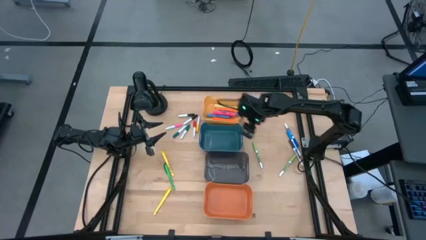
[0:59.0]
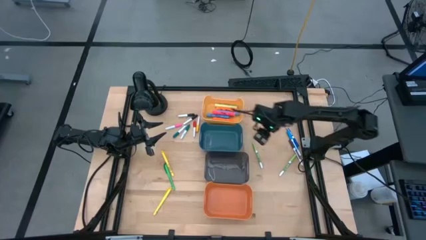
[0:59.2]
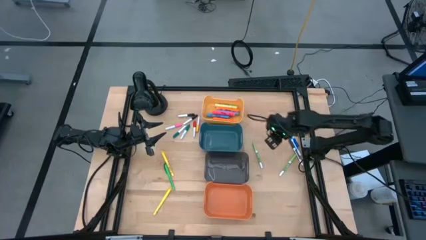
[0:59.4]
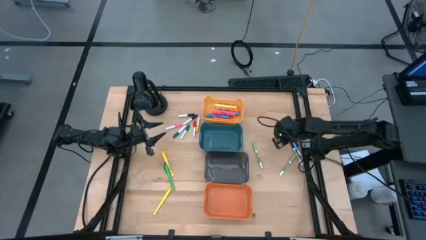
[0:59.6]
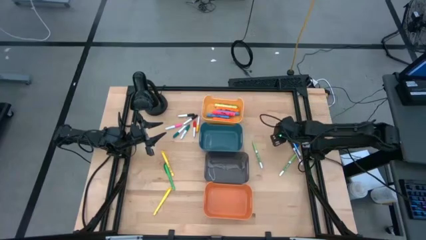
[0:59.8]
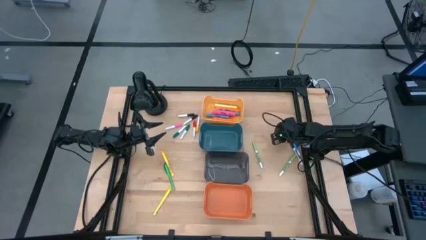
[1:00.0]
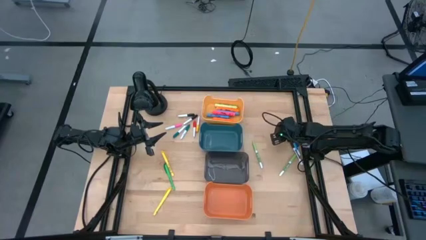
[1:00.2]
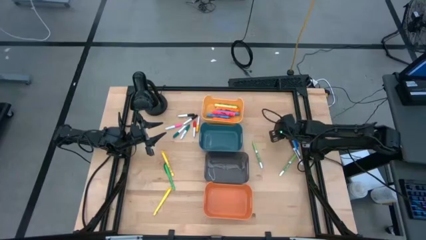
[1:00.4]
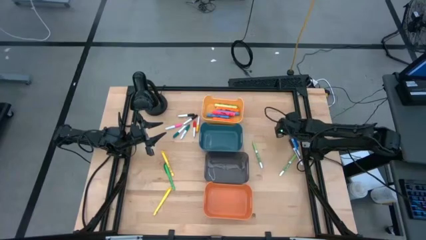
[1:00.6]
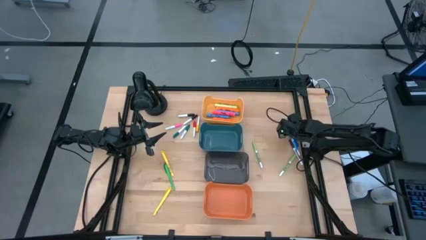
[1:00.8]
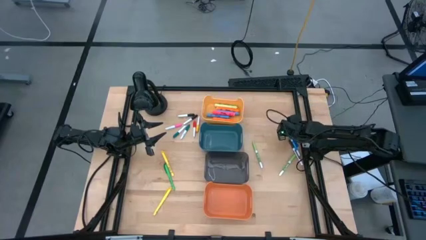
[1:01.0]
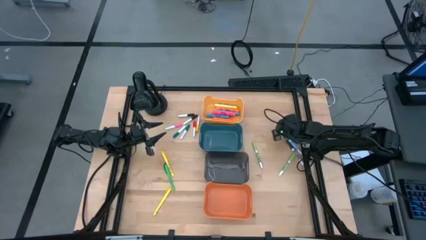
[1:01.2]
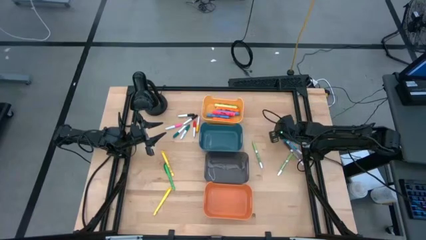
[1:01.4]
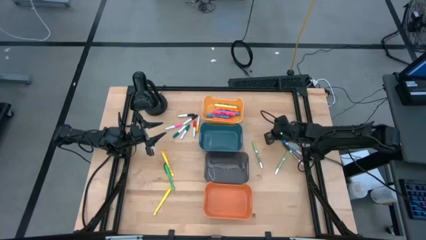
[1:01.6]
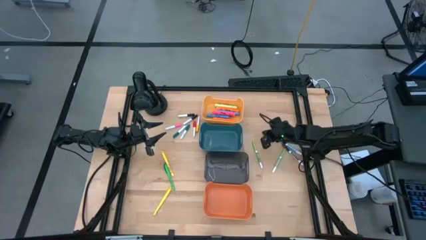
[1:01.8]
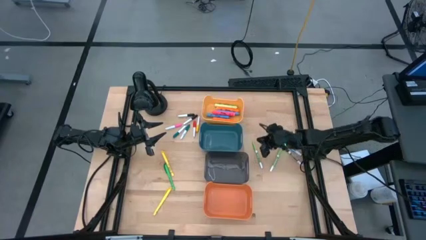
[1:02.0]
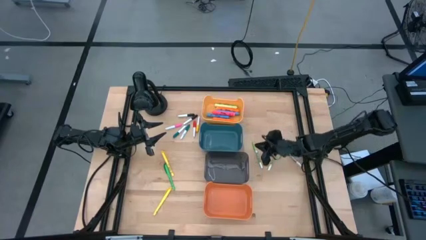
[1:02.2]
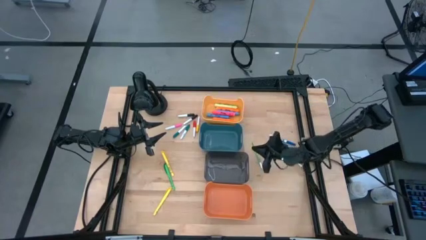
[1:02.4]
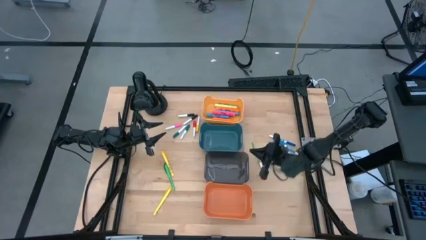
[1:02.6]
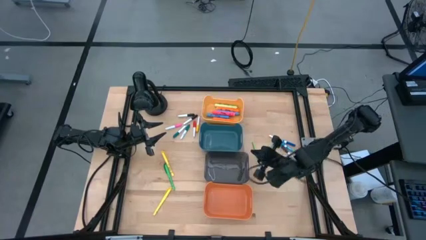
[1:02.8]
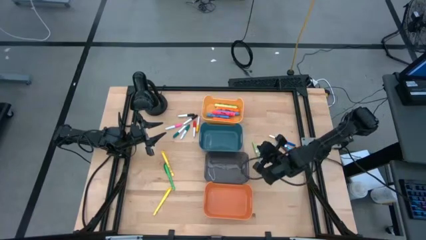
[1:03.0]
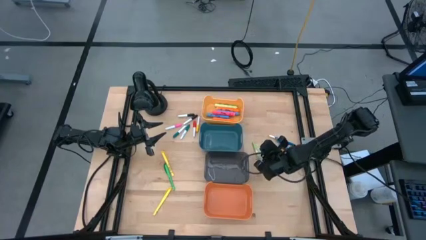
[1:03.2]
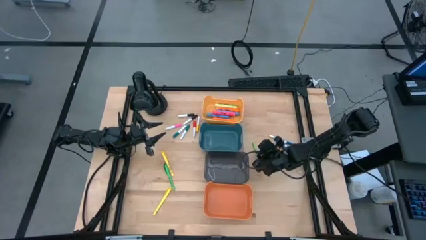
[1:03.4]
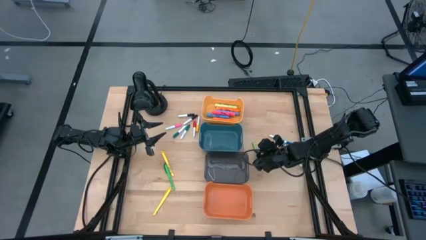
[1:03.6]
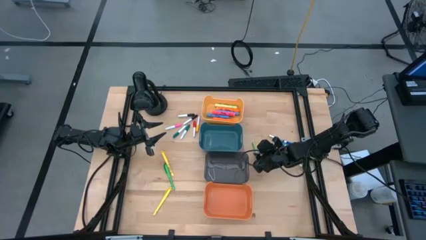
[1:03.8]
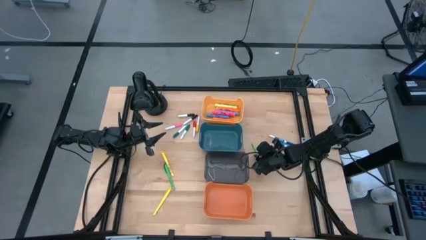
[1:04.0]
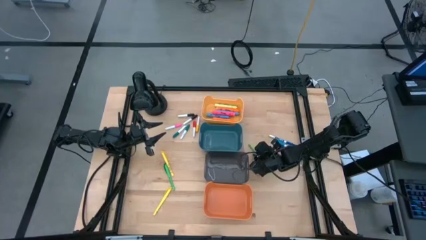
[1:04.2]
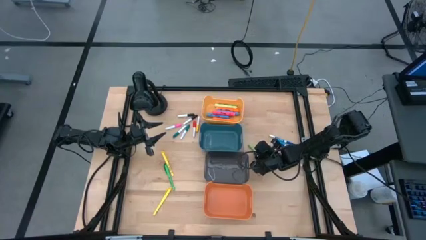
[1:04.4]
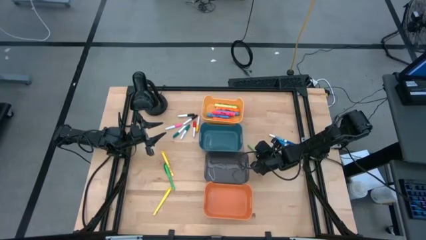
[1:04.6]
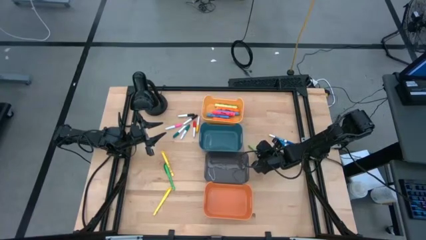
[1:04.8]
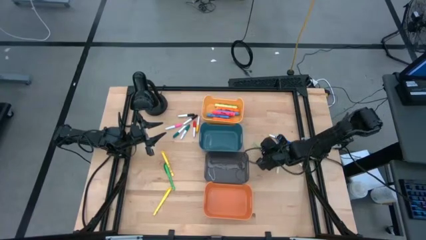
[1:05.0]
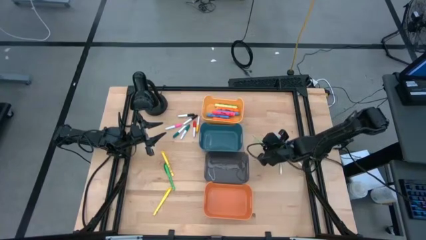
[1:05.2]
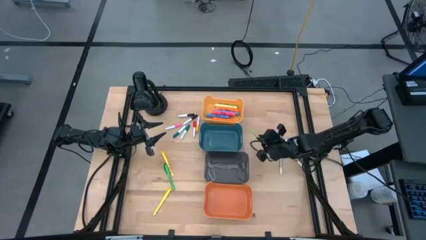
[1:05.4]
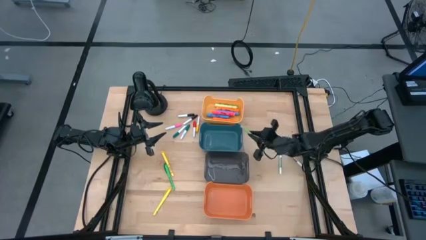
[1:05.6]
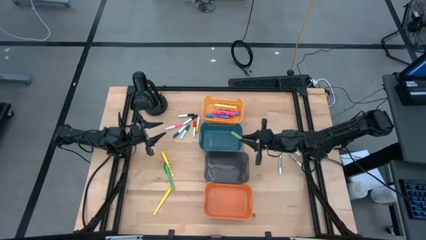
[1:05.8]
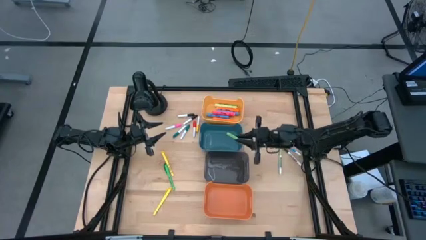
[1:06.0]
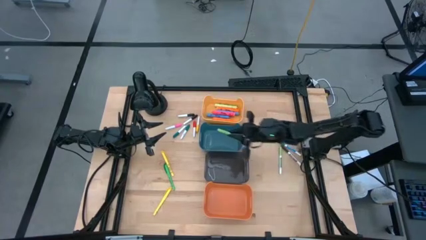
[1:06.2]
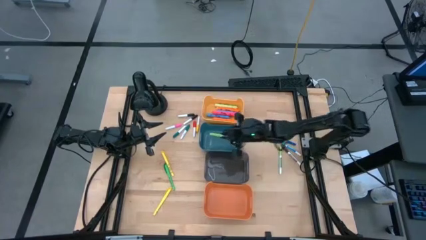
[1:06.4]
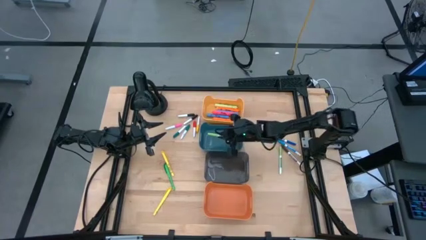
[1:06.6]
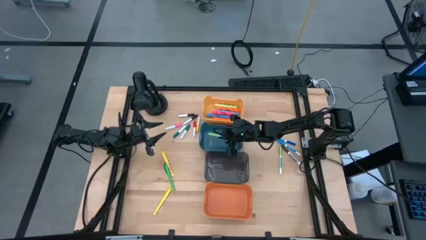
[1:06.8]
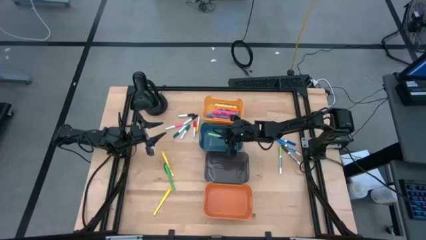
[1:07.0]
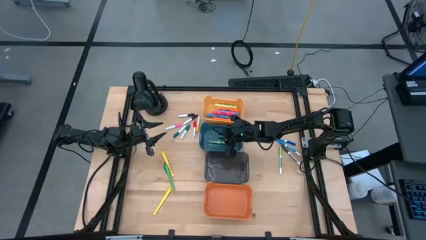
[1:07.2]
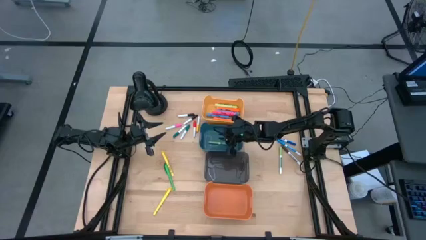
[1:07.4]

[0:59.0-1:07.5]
Task: Pick & Place Markers
Put the left light green thin dry erase marker into the blue bin

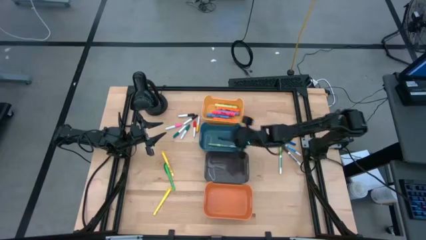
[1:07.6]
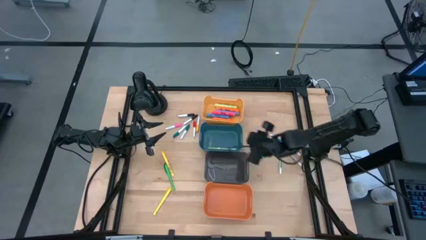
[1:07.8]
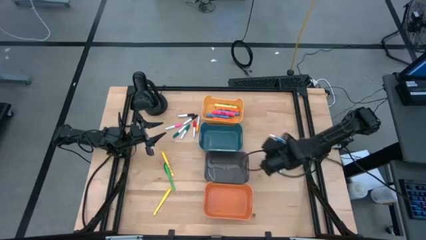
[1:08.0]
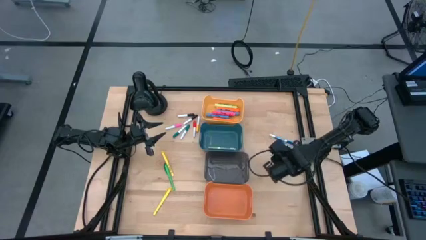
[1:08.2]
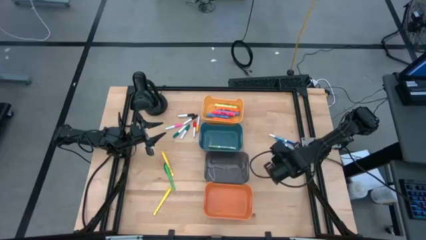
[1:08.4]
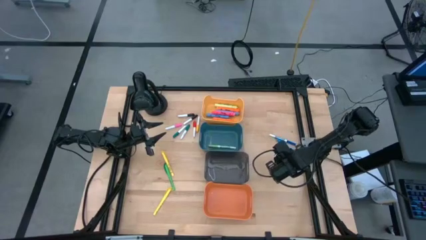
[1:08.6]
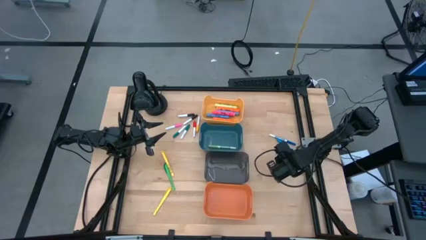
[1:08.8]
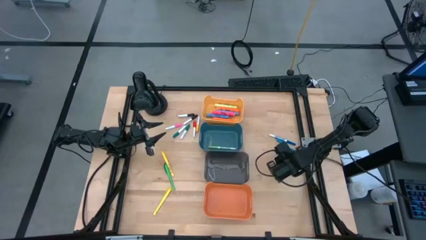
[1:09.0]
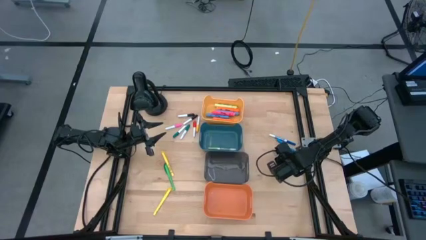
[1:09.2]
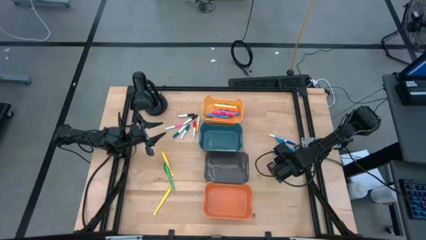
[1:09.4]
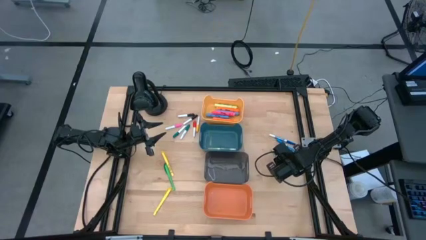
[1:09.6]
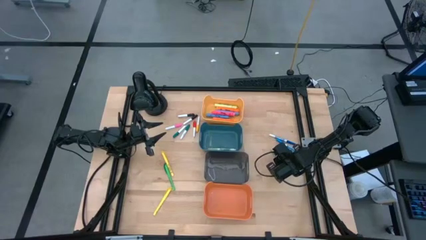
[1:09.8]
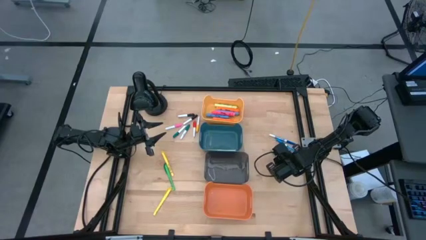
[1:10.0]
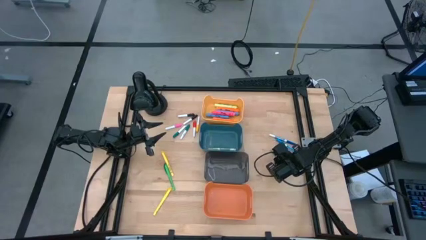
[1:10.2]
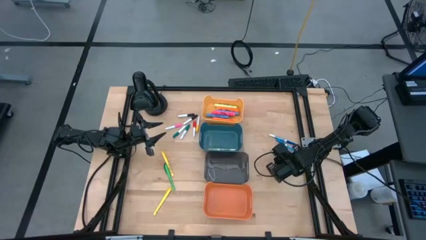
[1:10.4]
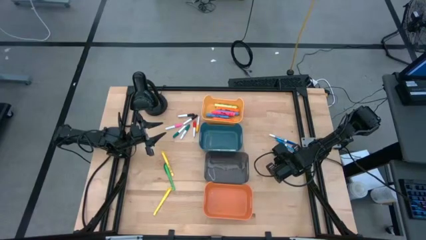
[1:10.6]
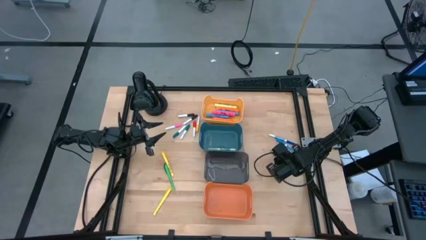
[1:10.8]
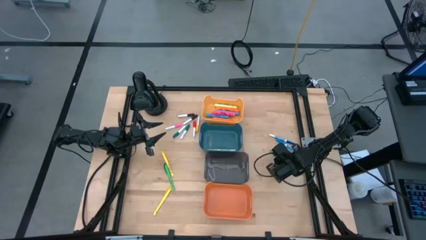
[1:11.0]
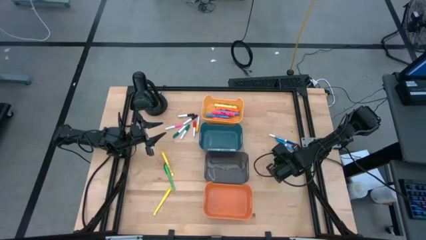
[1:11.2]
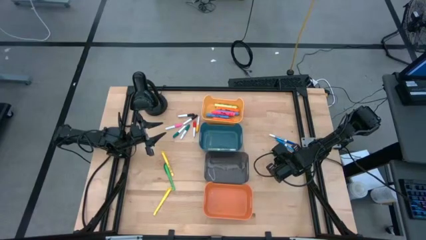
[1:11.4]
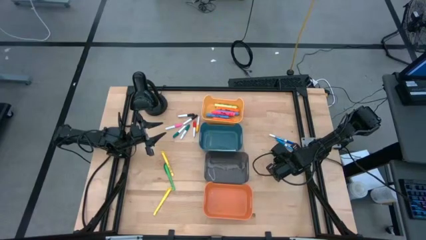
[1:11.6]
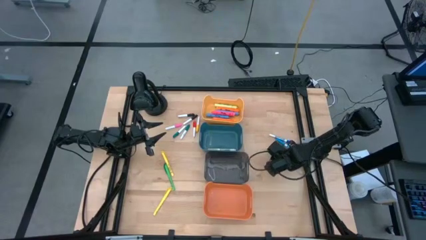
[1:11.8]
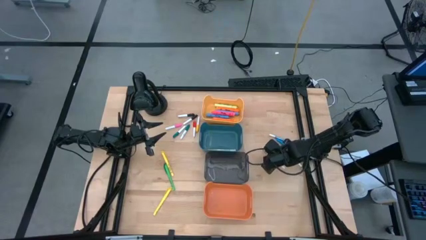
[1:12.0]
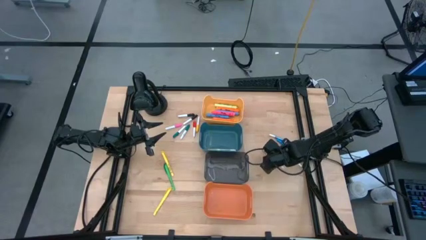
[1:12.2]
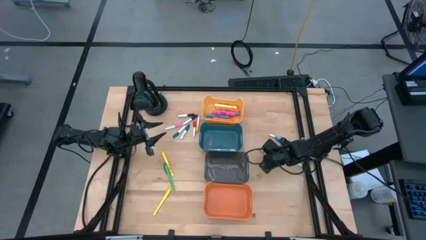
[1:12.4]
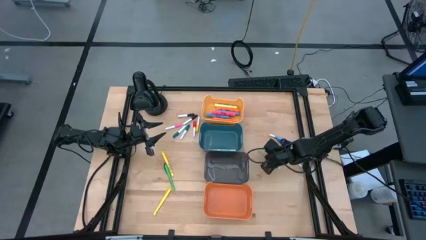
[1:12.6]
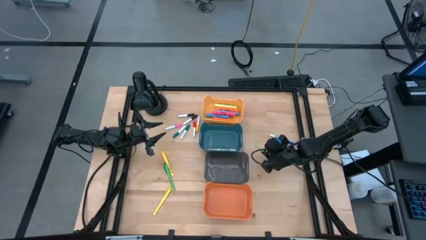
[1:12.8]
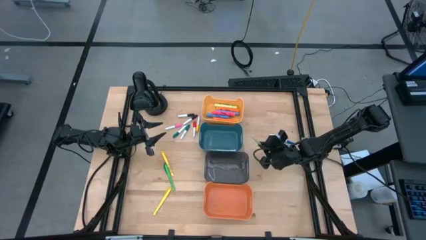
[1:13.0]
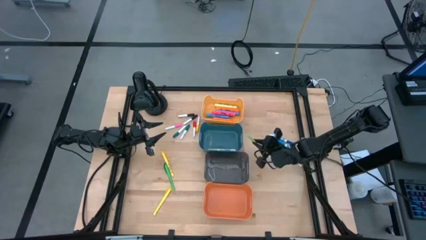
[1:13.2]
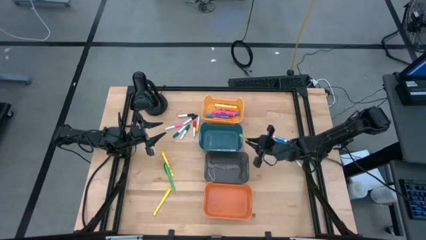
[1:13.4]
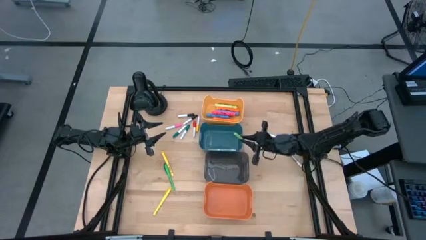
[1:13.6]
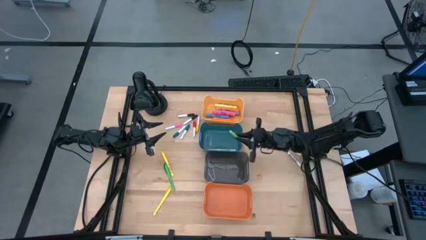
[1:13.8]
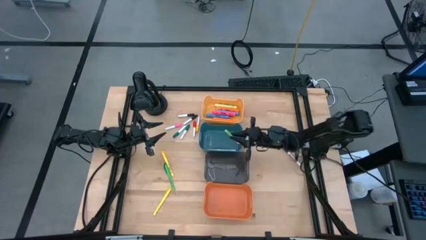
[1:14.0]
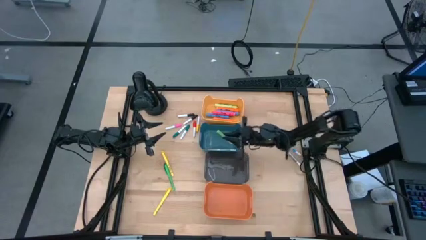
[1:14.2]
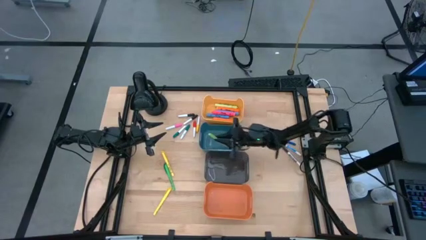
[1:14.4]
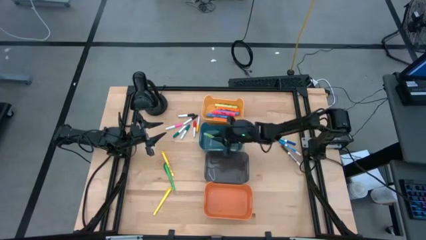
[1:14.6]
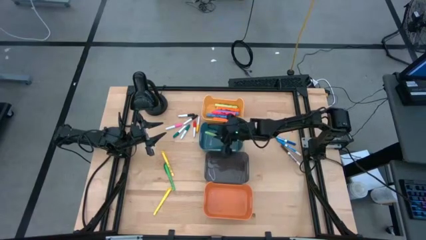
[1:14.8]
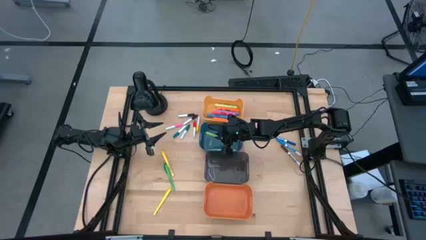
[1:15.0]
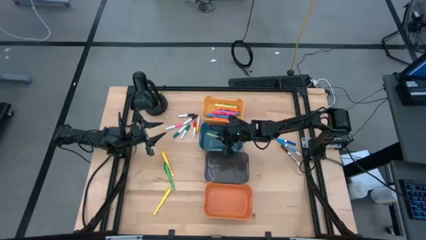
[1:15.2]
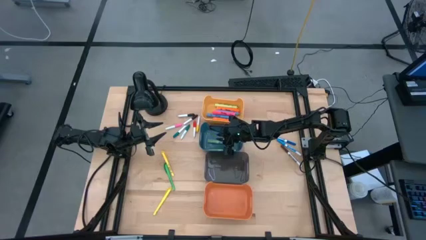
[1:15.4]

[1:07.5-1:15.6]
Put the light green thin dry erase marker into the blue bin
